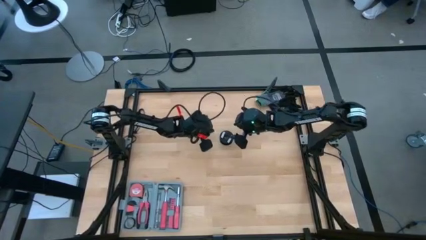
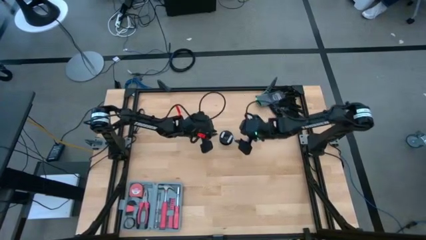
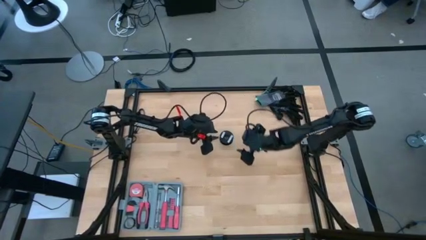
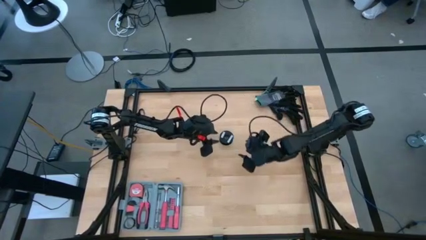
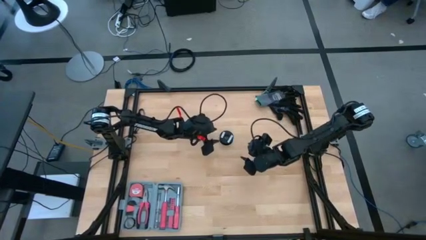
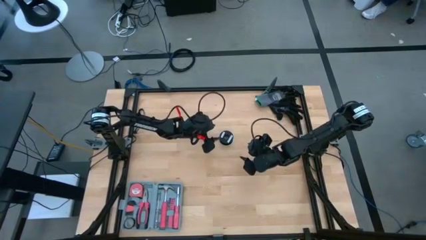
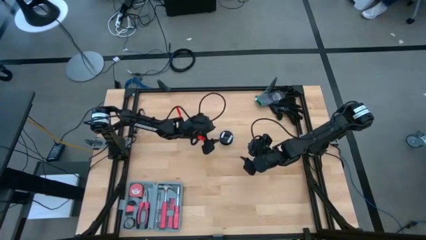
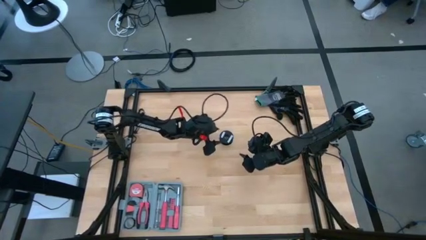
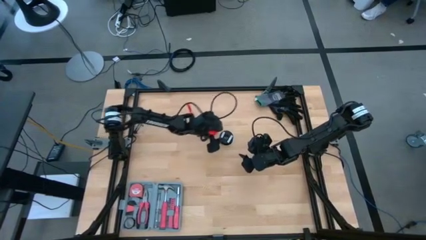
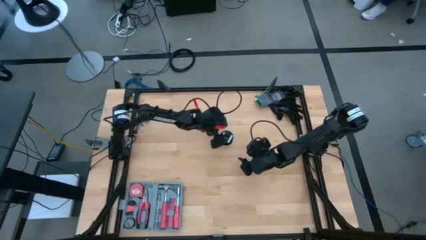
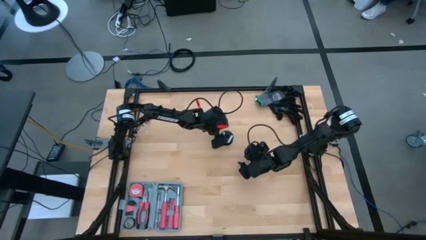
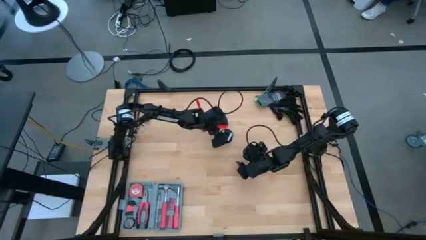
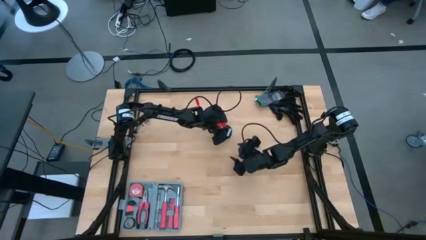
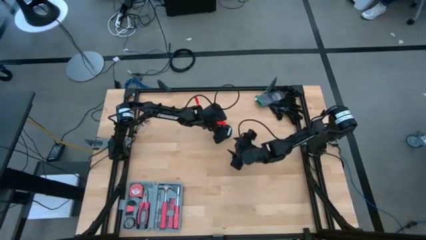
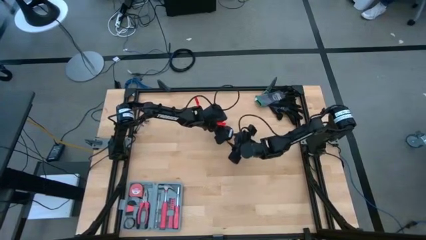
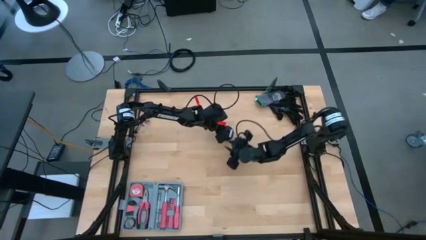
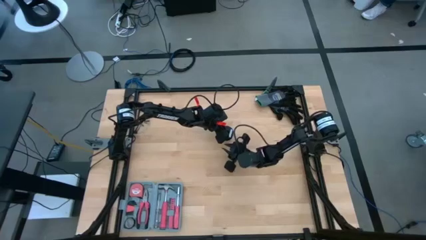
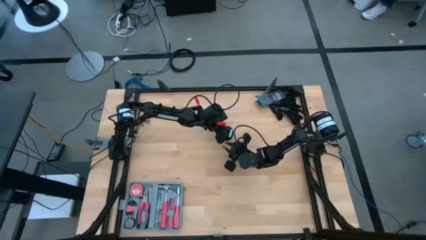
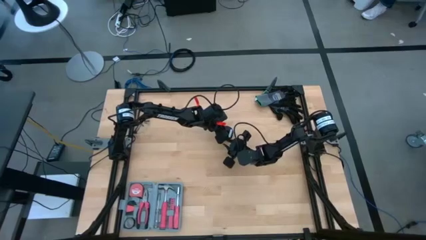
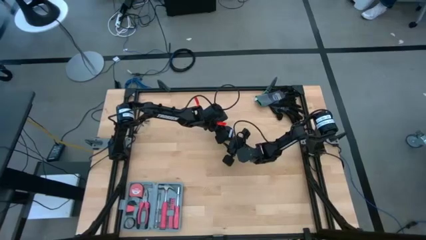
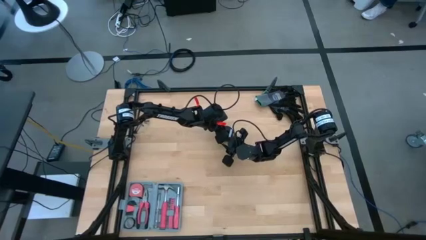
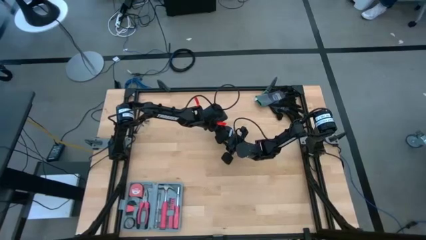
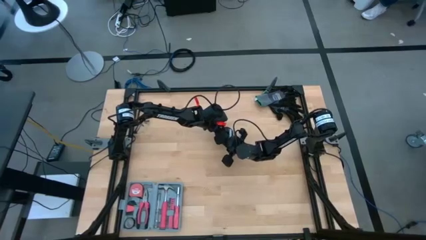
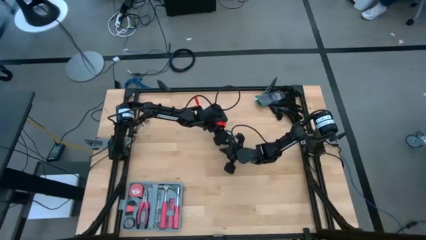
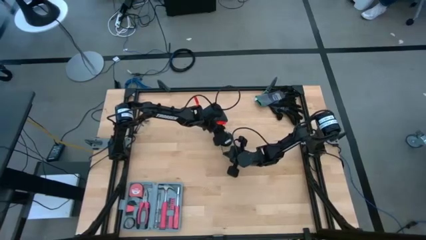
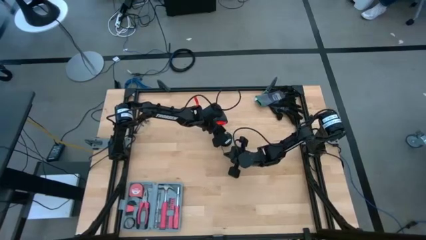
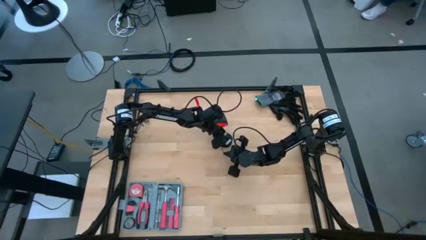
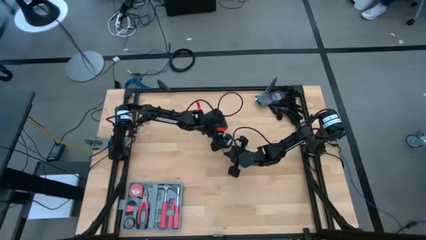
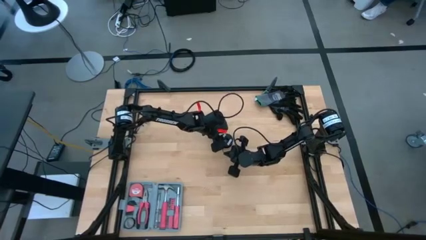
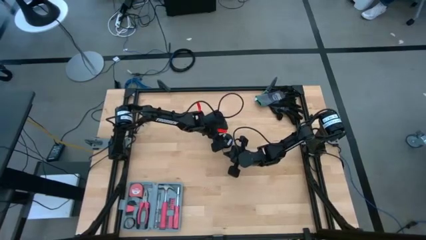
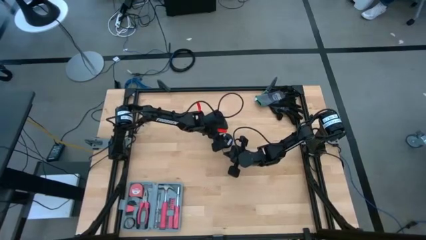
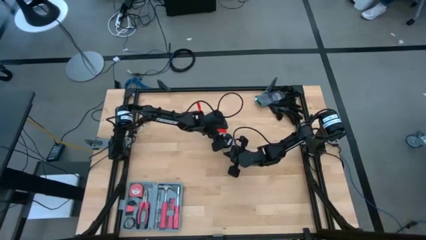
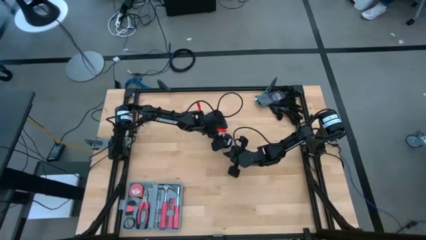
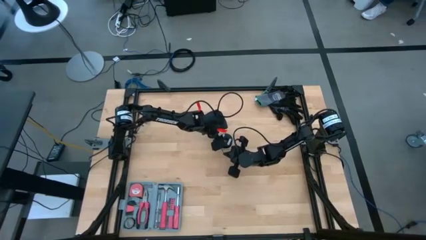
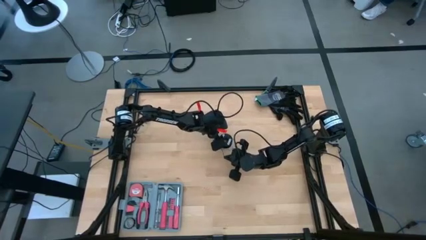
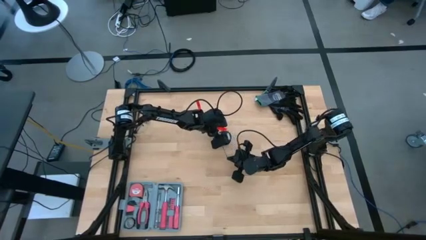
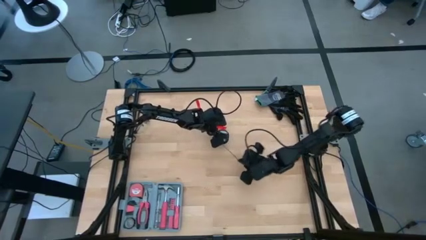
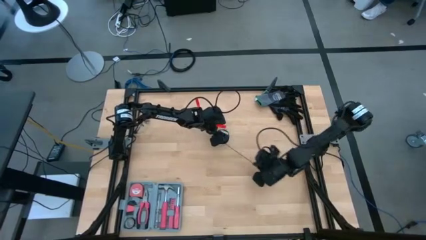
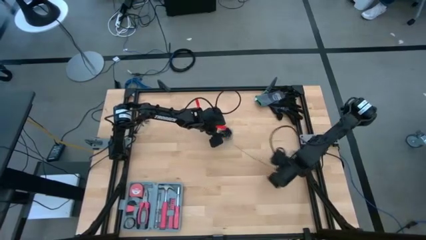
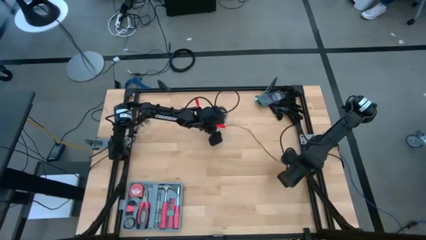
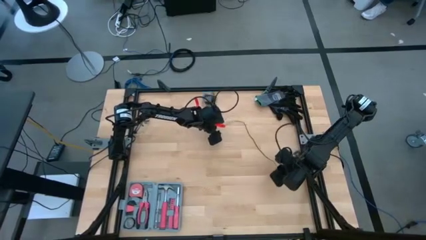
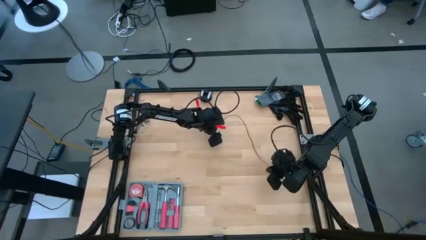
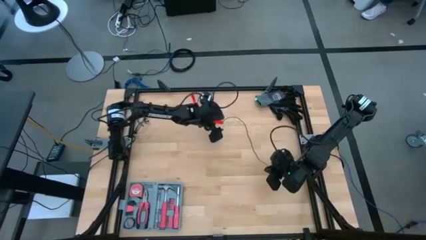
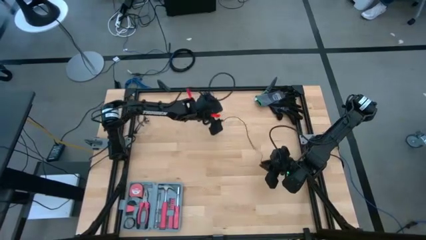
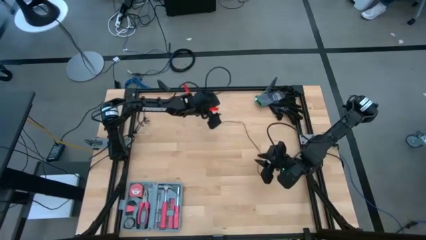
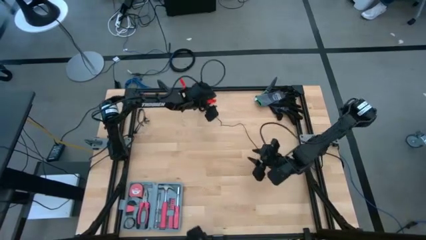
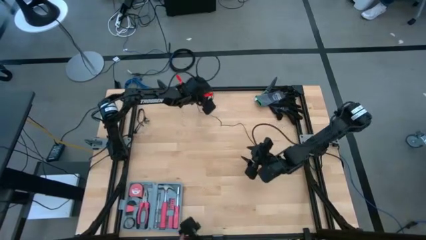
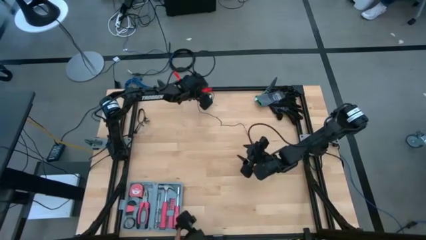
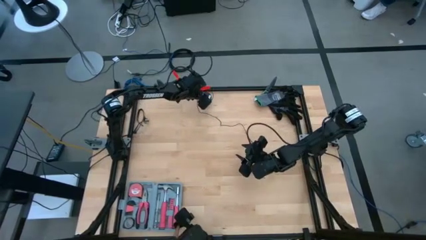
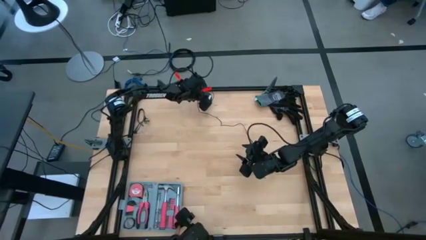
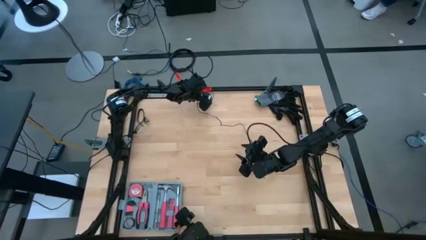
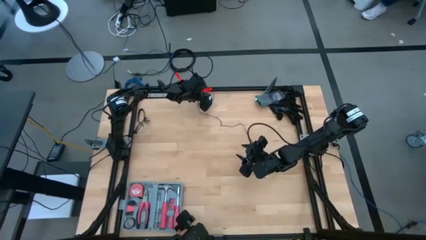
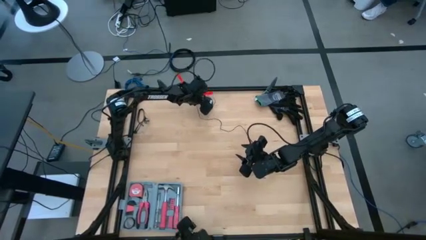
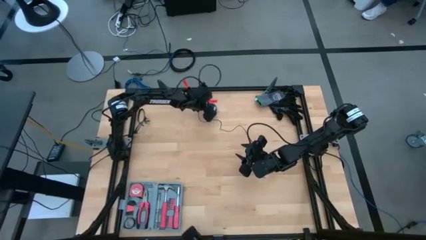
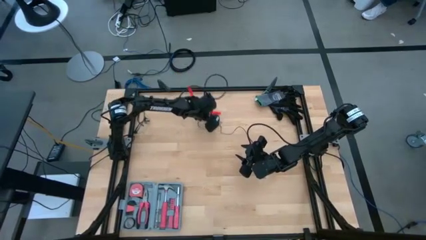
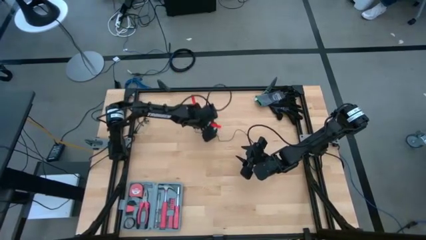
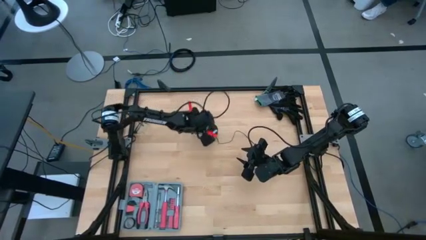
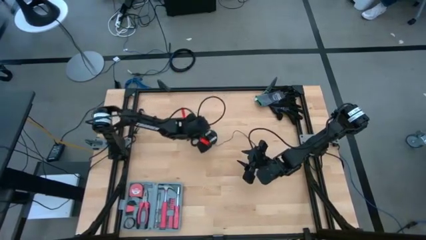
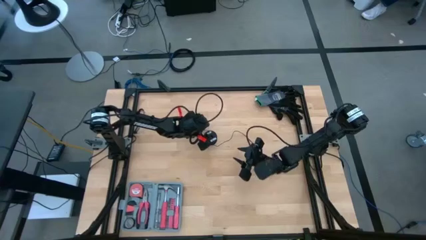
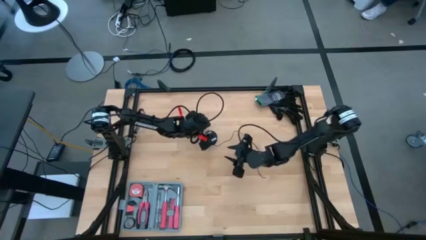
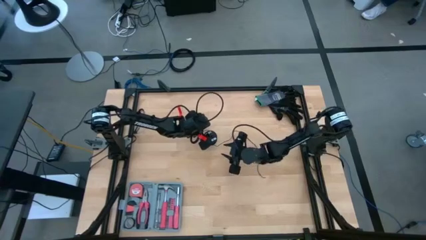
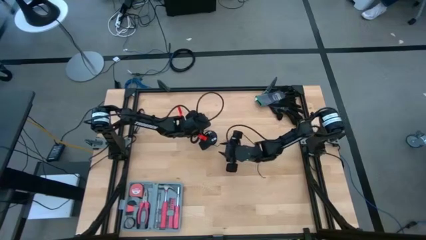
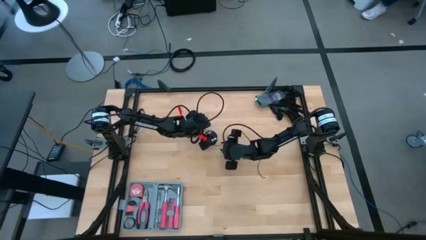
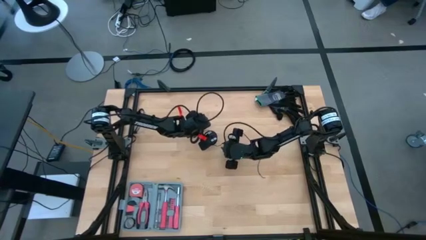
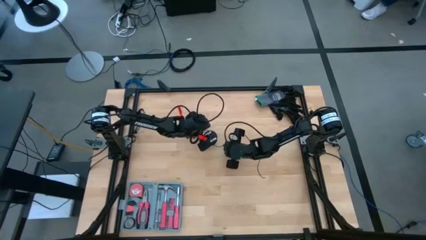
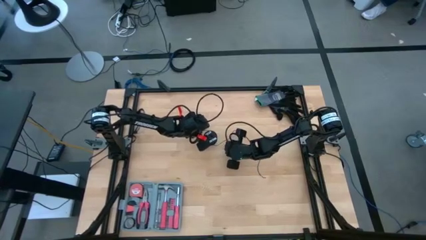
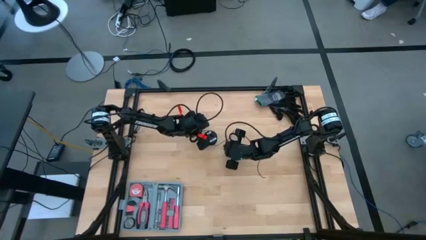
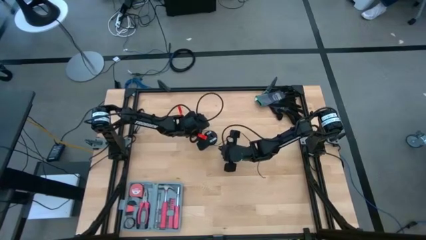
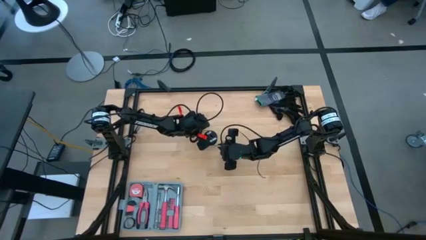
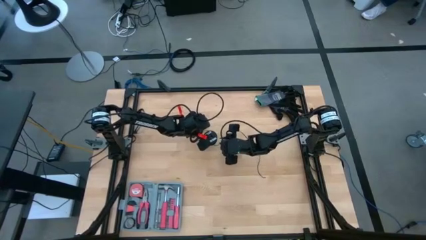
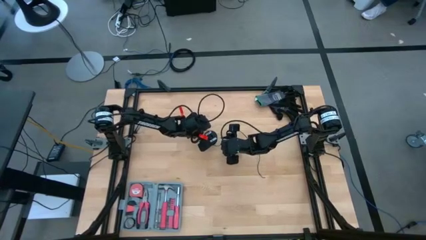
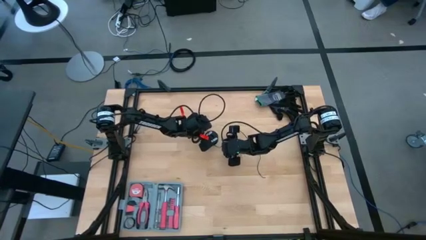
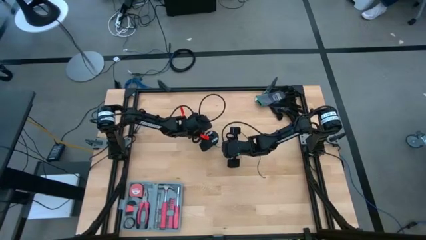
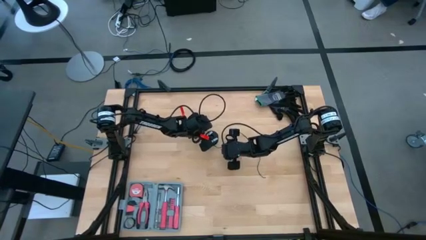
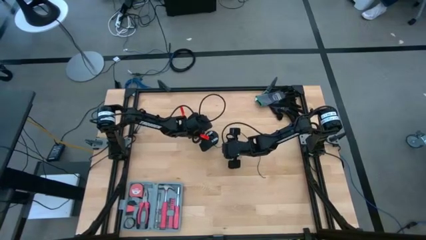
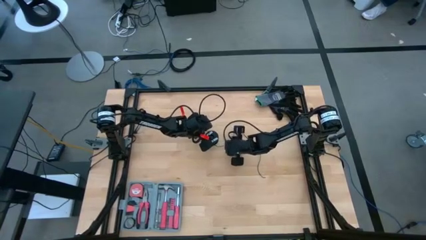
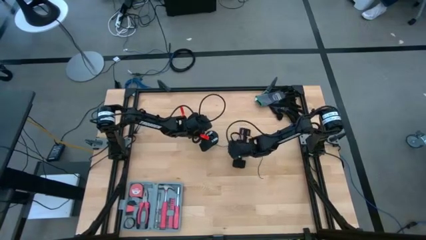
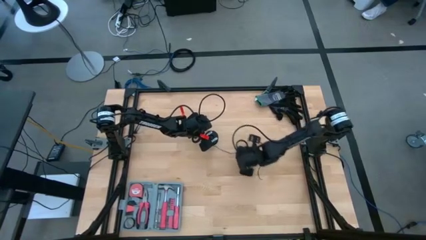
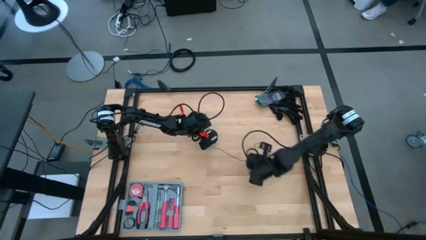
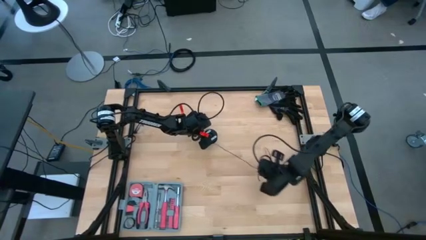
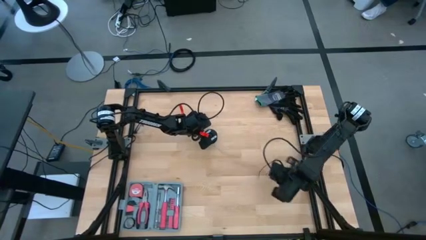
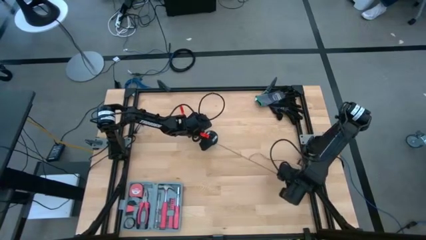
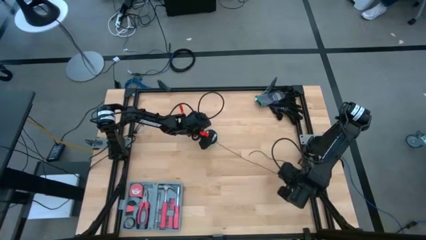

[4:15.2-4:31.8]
Task: Coil cords
Uncoil the black wire from the spool
